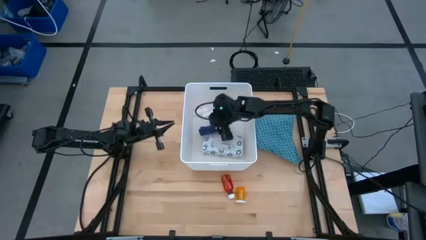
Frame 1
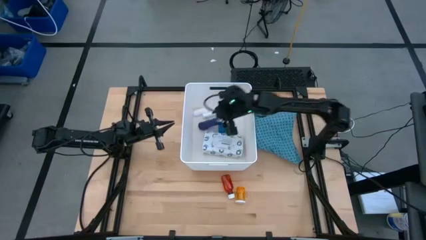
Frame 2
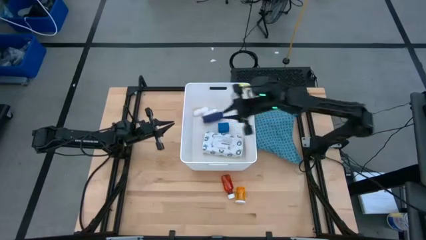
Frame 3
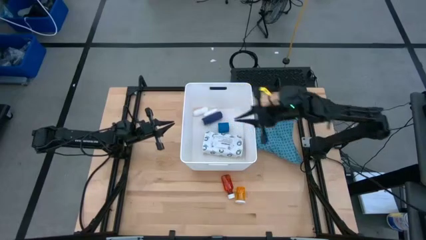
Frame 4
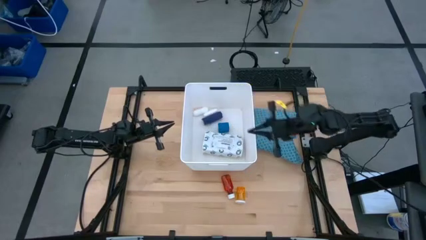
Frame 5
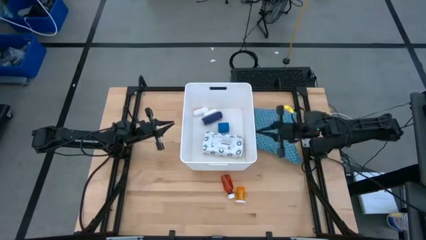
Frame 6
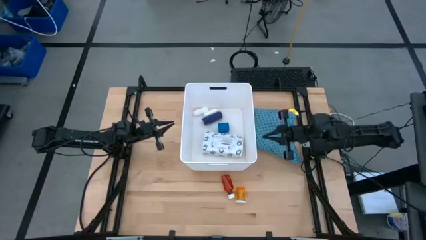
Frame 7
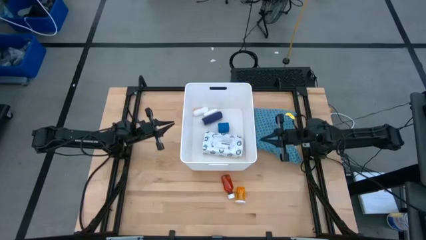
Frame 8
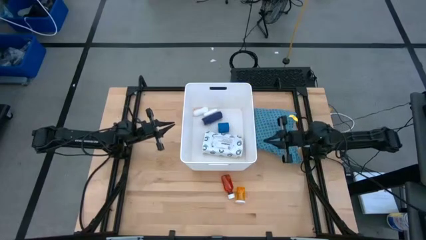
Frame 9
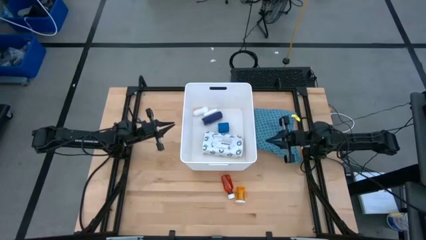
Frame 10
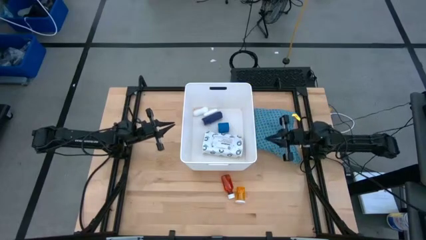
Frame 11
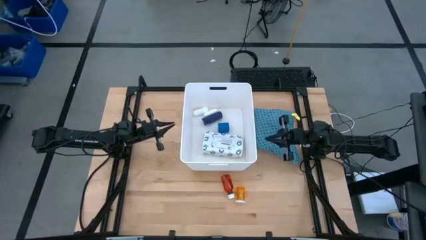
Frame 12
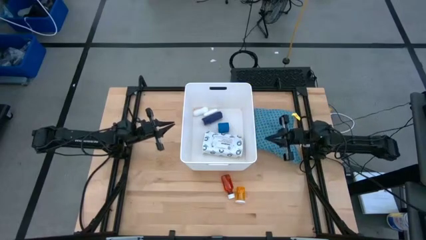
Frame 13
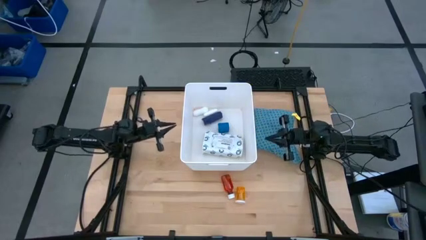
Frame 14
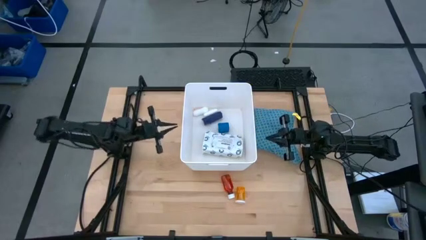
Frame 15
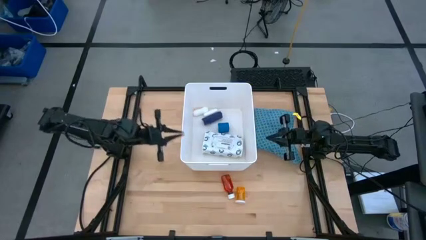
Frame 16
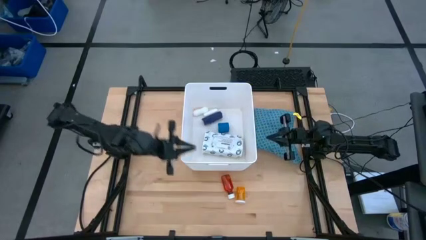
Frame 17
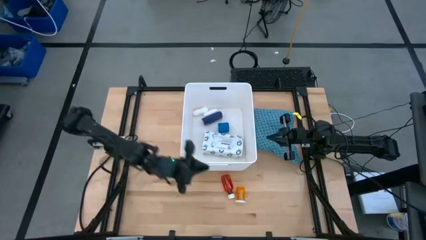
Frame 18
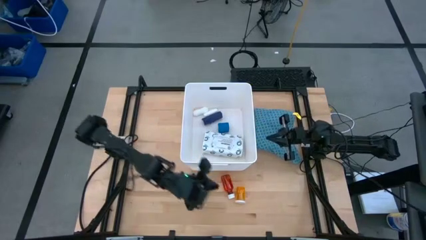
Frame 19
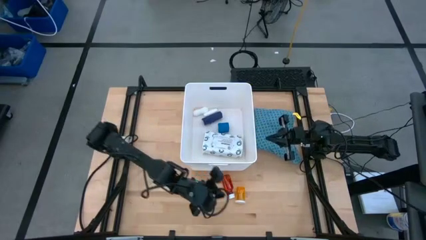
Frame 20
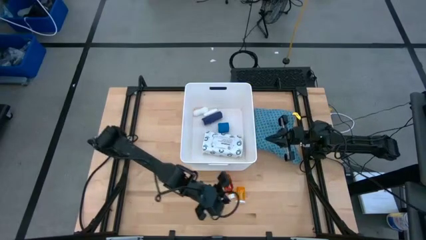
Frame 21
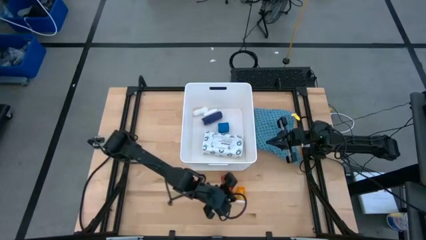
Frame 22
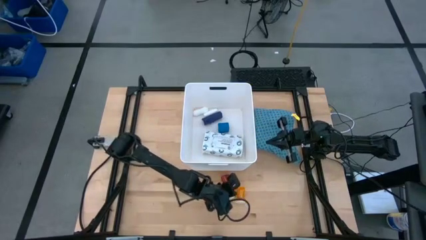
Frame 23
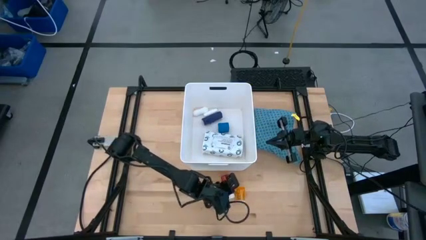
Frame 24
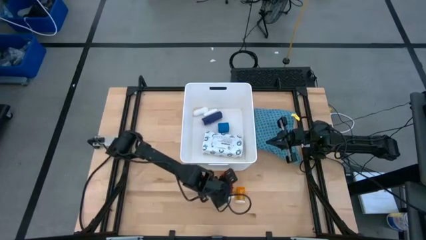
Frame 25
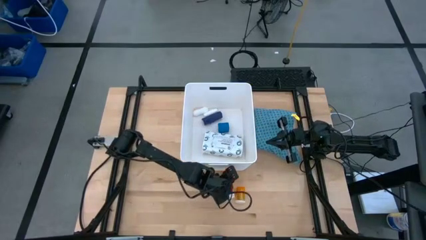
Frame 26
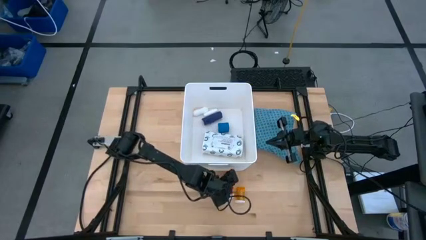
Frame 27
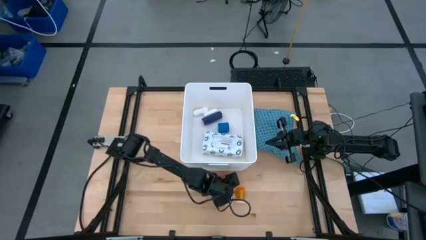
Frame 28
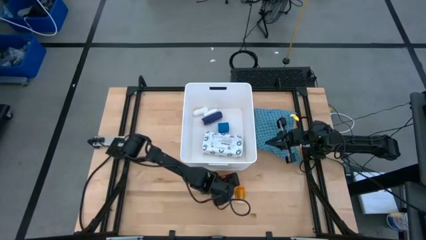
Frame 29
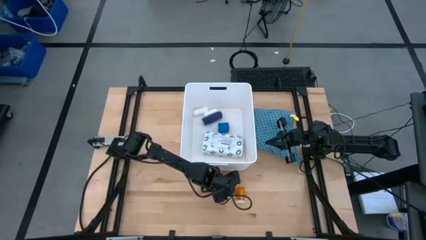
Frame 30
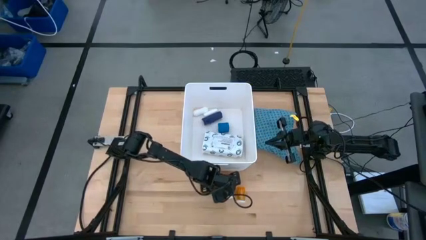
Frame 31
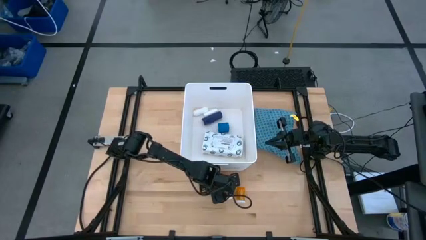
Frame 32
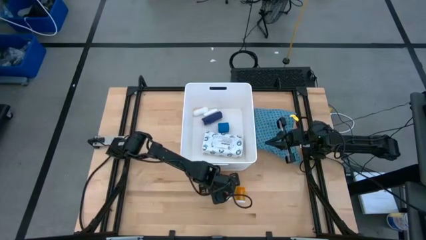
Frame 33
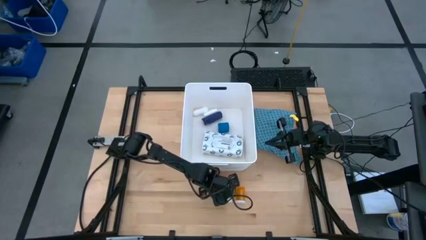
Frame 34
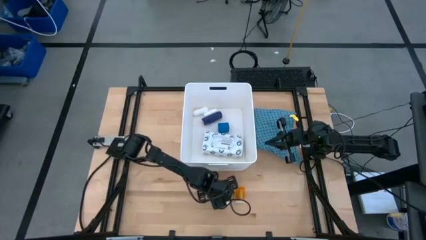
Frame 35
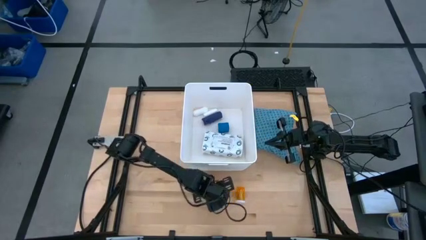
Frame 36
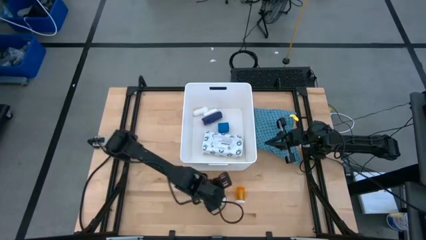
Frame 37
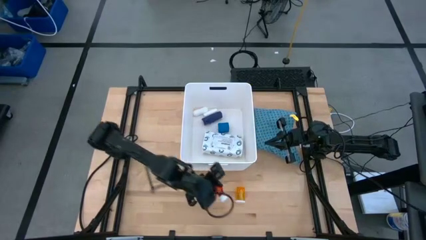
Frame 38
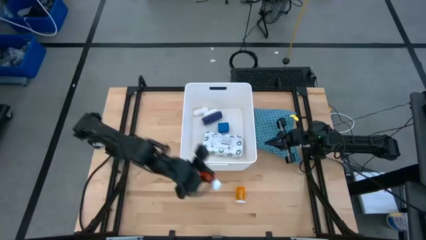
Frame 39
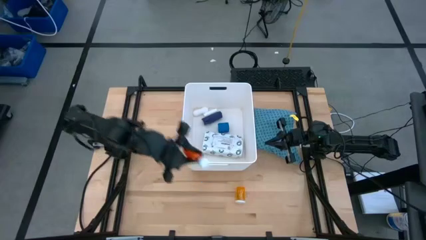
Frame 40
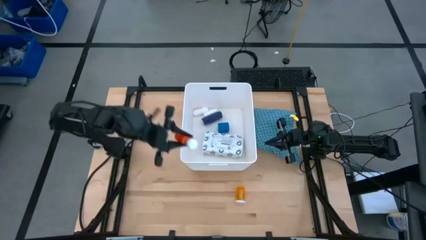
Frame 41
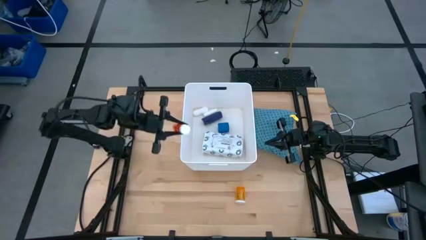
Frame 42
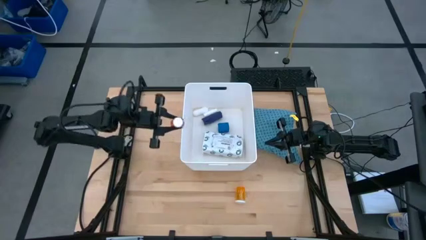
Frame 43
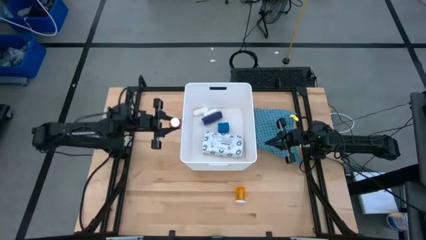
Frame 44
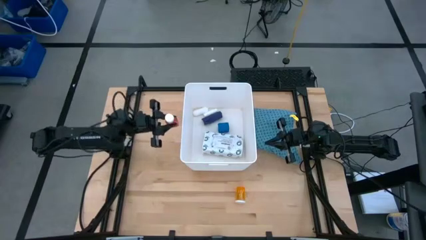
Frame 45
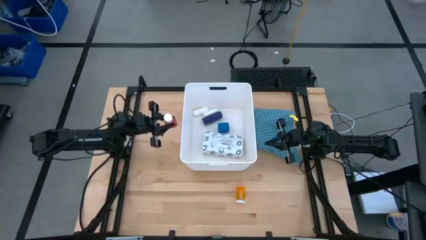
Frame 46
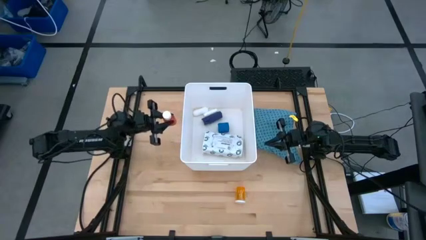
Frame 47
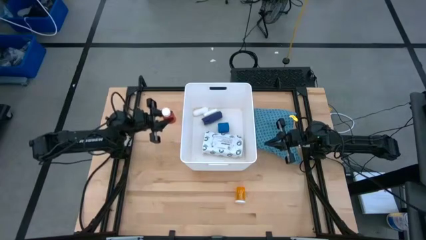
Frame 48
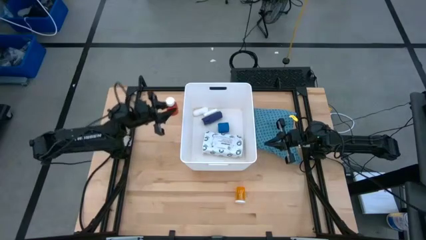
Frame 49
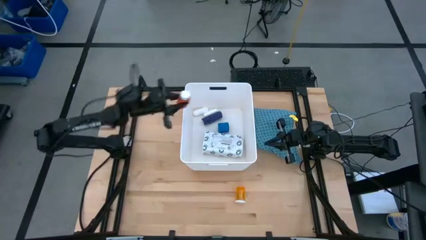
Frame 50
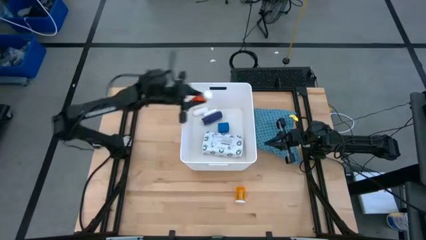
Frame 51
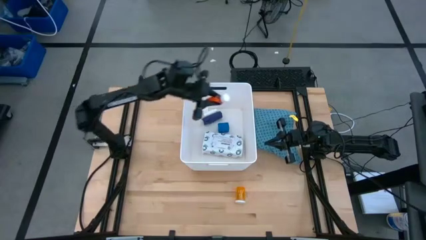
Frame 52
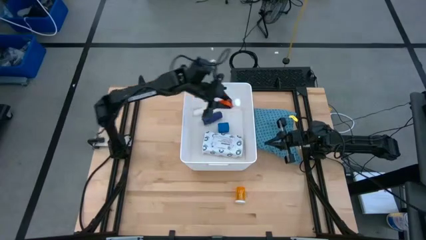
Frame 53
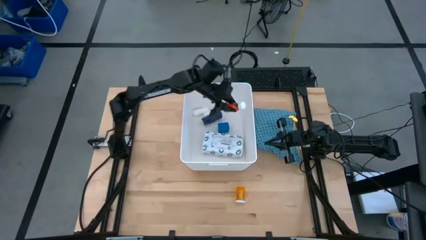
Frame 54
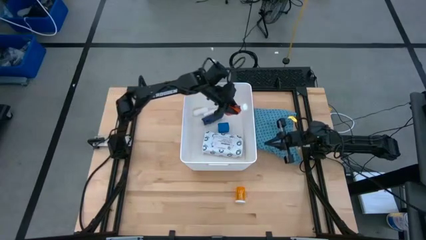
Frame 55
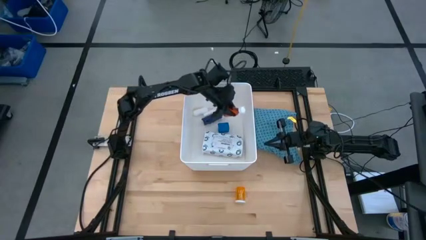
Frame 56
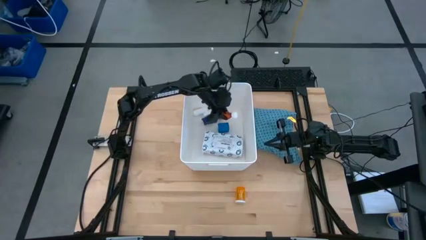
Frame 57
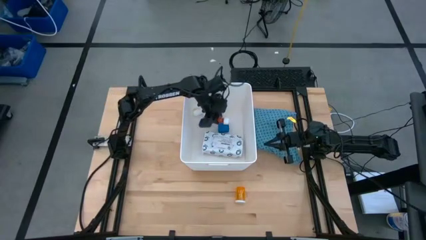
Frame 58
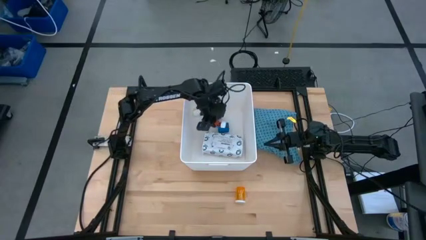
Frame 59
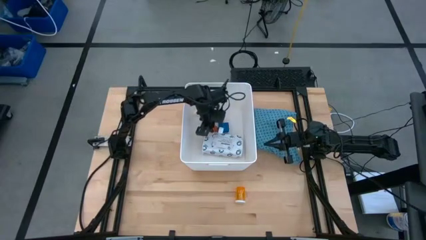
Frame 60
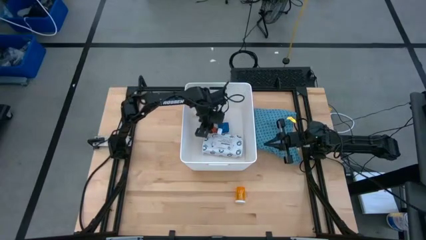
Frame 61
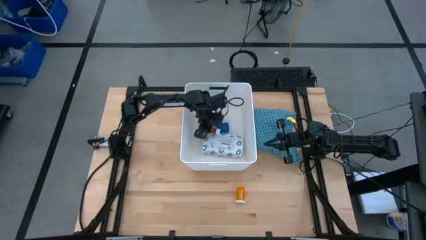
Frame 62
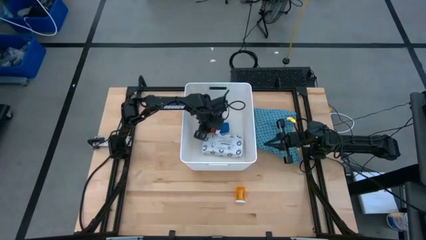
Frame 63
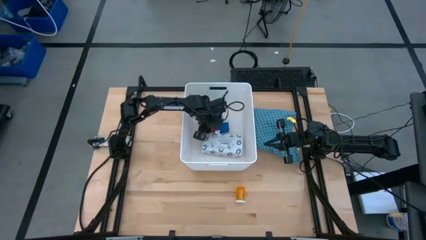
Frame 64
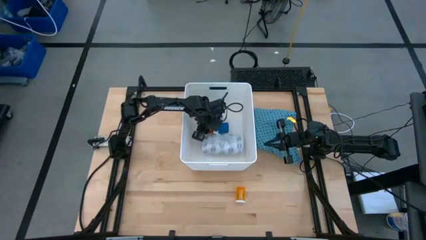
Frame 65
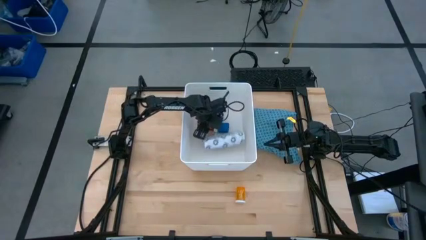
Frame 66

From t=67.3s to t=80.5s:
Task: Pick & place medical supplies in basket/bin
Put the red medicine bottle into the white bin

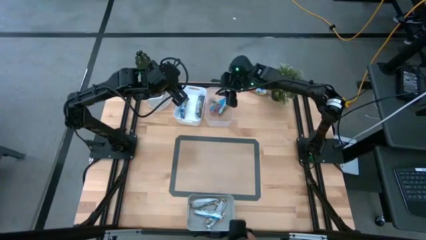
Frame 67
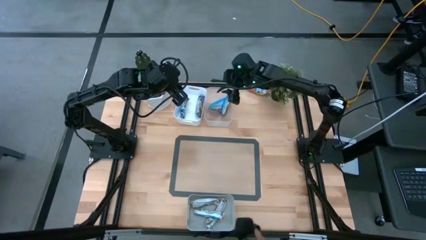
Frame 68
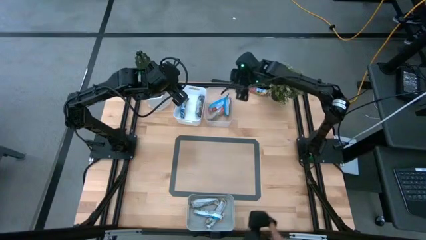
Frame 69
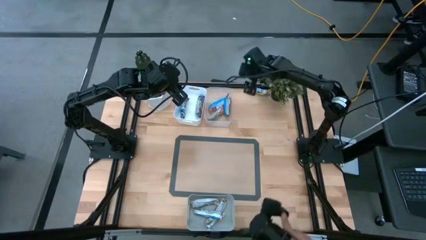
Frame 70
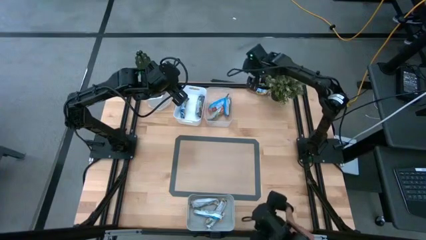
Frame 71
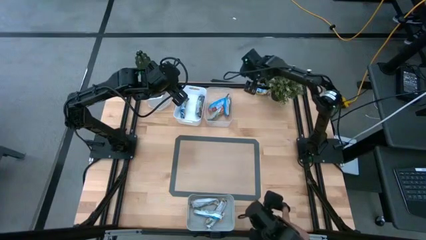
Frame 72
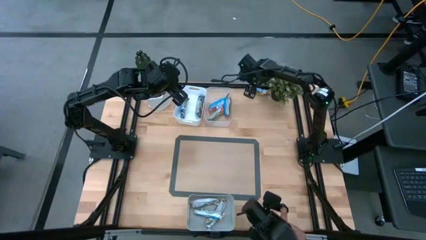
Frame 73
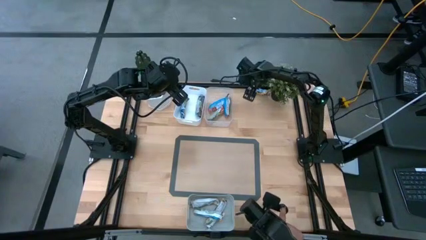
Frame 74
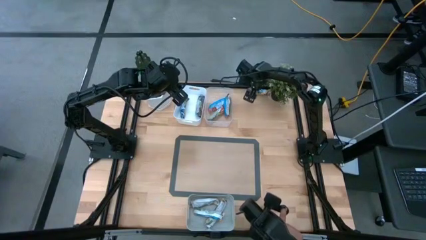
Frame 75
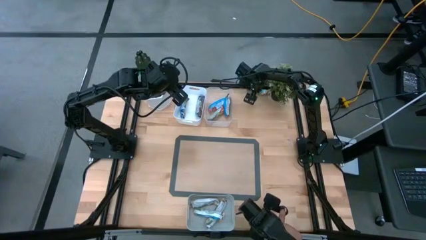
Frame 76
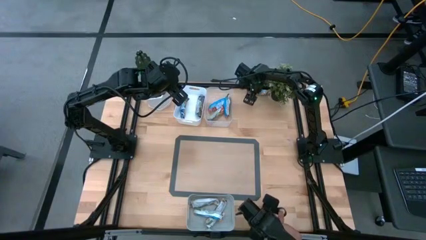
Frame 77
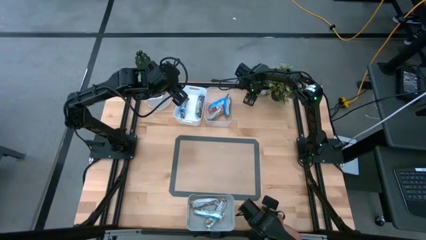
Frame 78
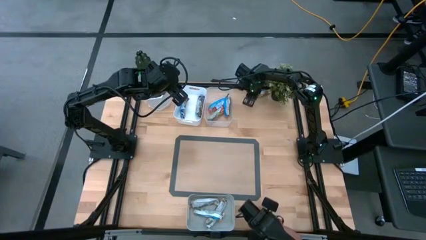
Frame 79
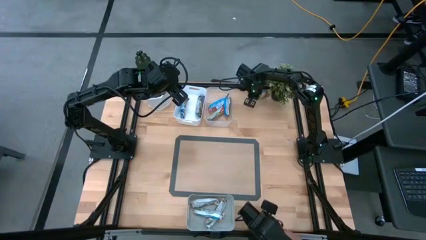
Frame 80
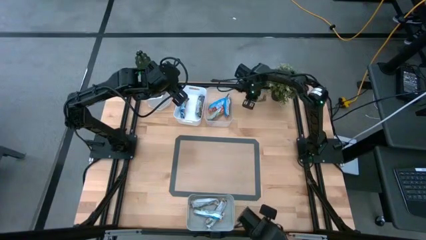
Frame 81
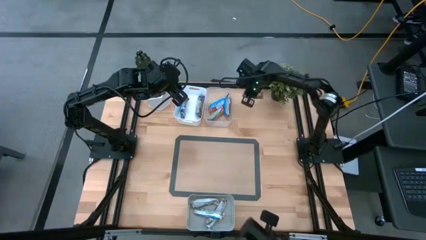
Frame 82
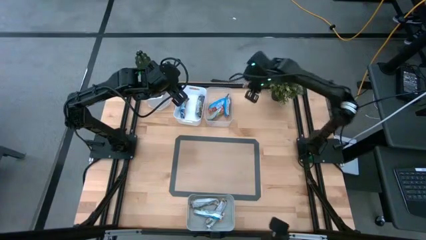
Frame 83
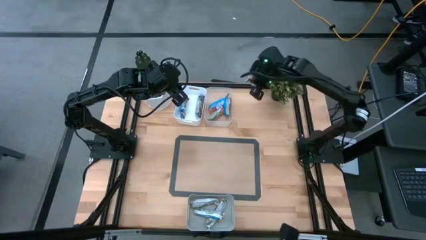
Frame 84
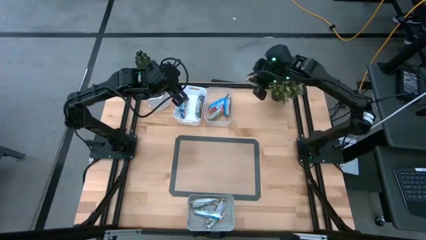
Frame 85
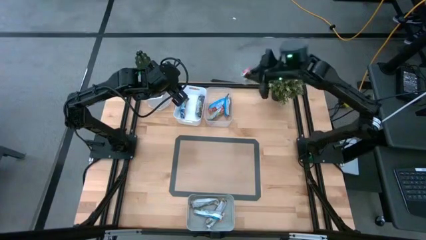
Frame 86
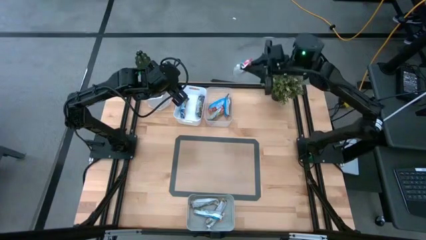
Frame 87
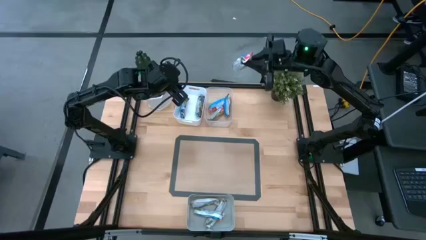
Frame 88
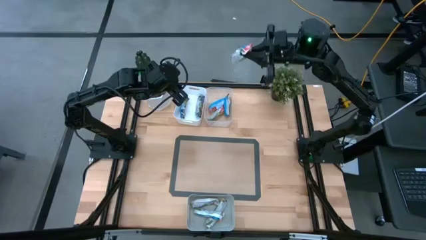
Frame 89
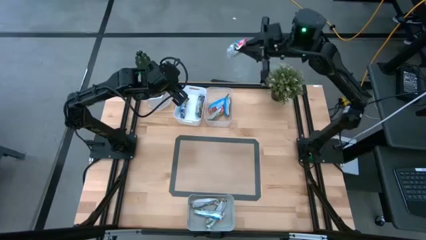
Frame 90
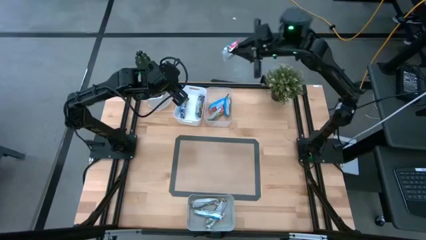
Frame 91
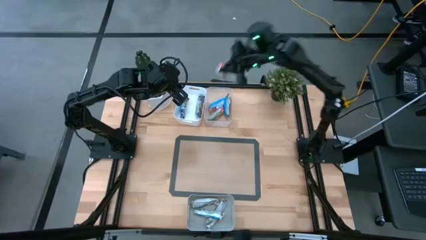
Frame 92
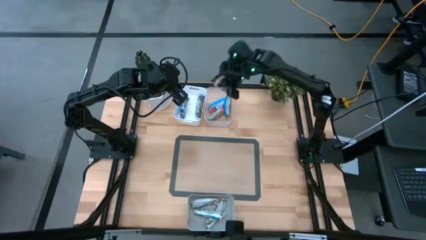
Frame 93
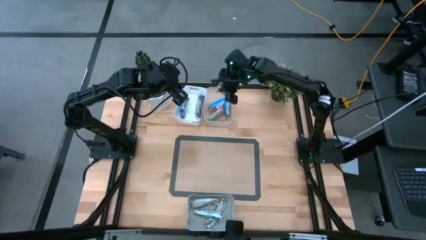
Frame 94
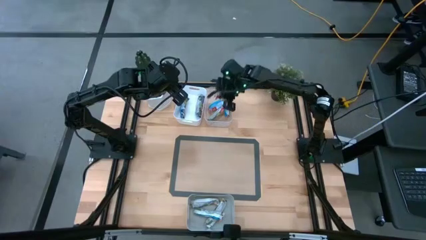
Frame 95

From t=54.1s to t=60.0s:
Task: Pick and place Granola Bars by type
Put the red granola bar into the transparent bin
